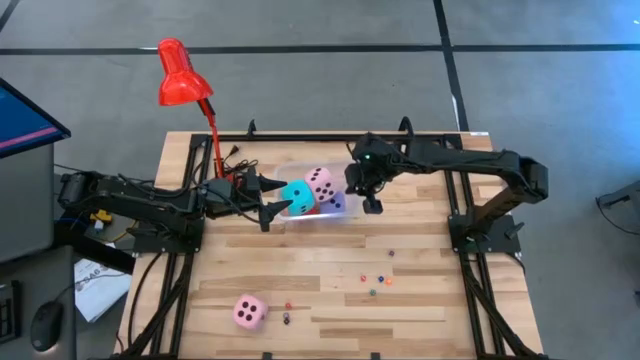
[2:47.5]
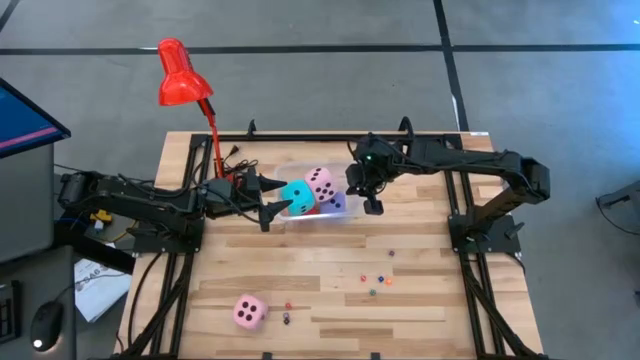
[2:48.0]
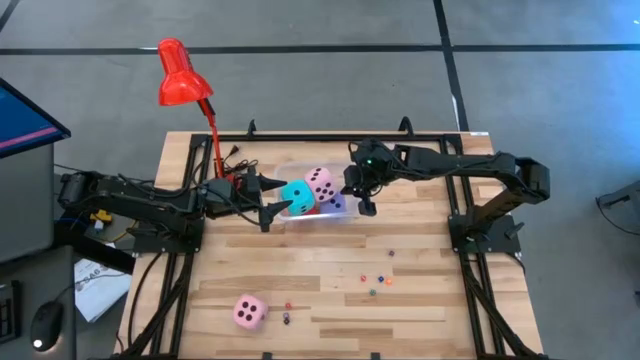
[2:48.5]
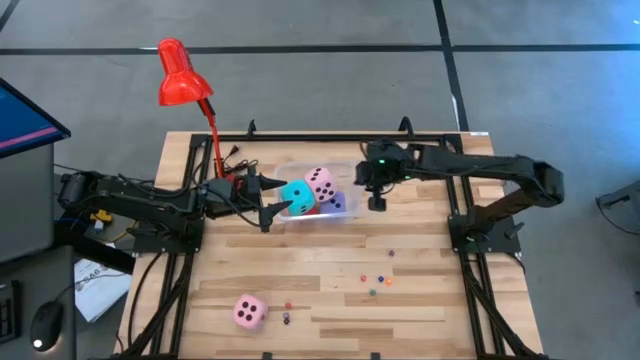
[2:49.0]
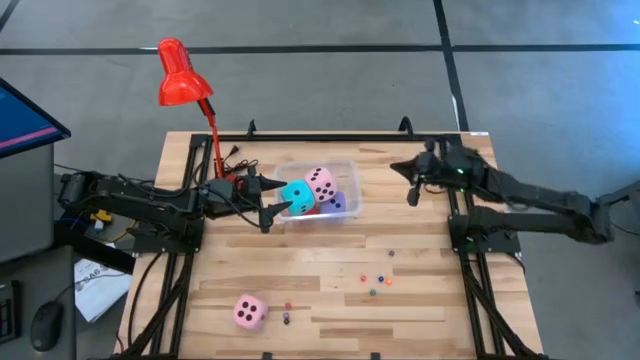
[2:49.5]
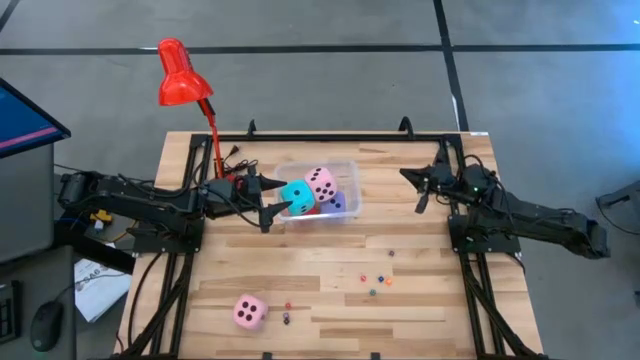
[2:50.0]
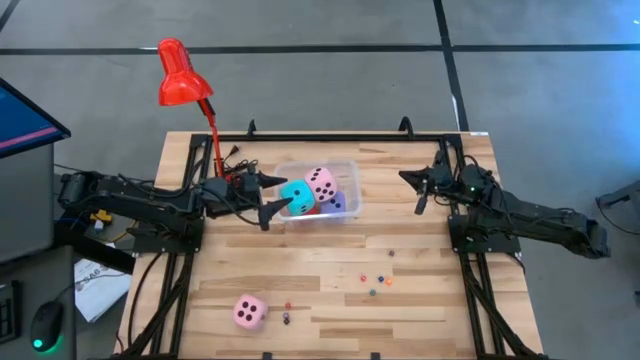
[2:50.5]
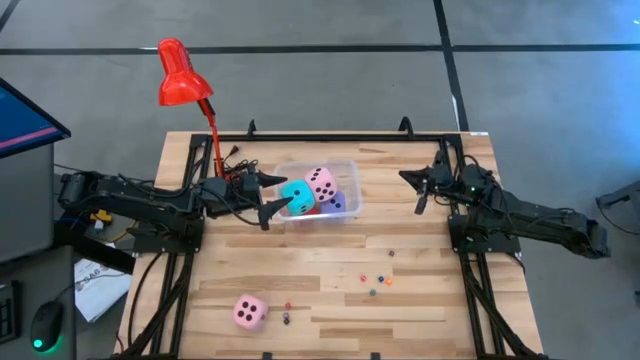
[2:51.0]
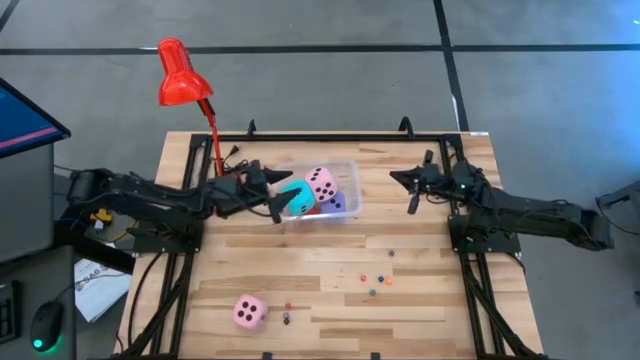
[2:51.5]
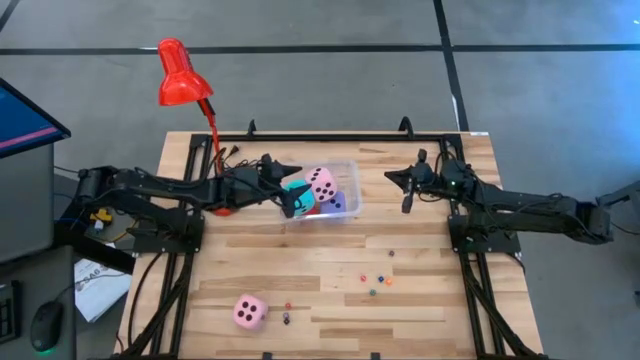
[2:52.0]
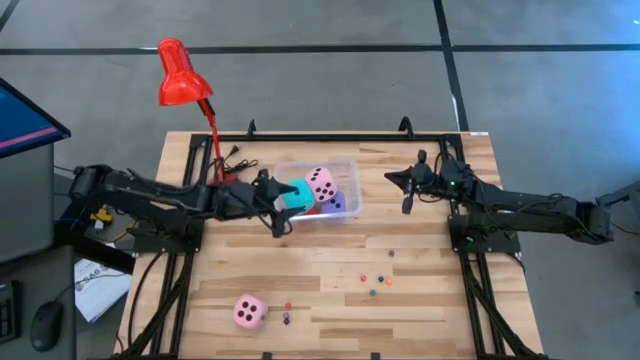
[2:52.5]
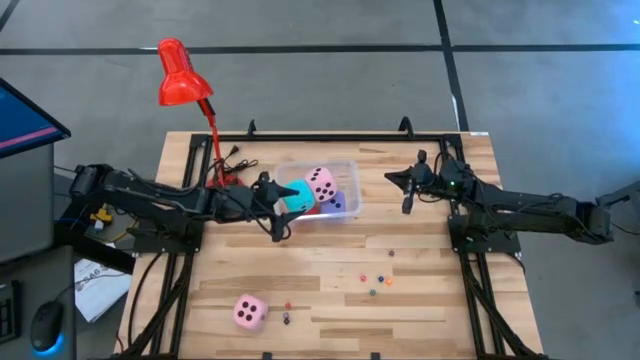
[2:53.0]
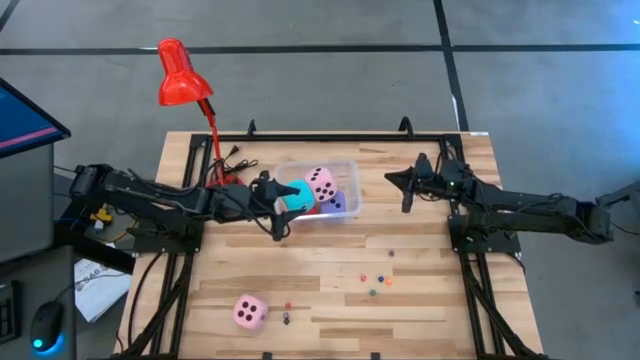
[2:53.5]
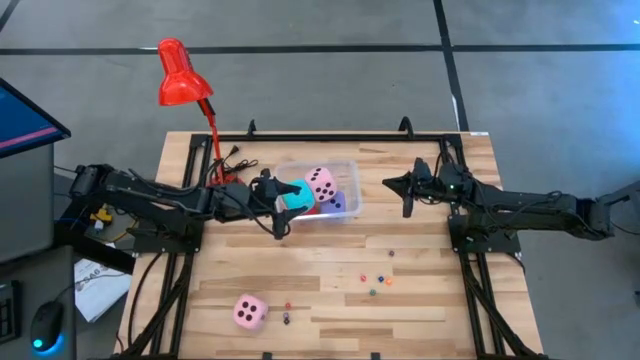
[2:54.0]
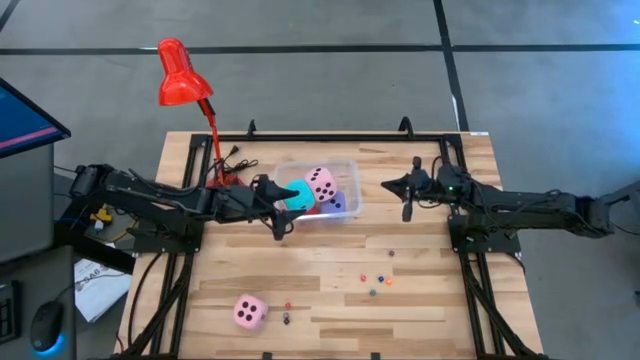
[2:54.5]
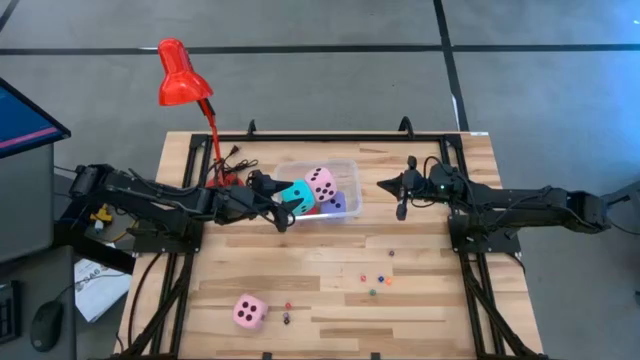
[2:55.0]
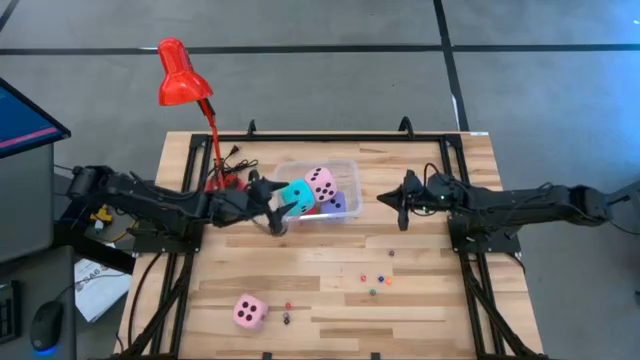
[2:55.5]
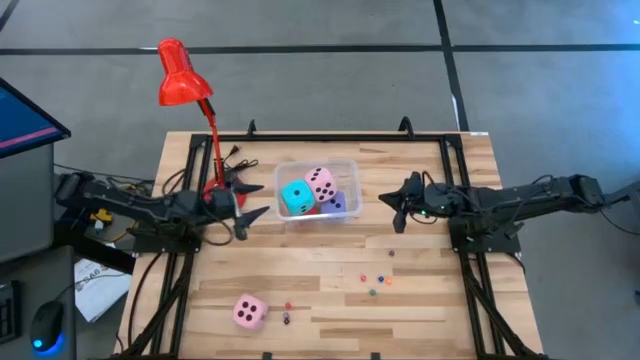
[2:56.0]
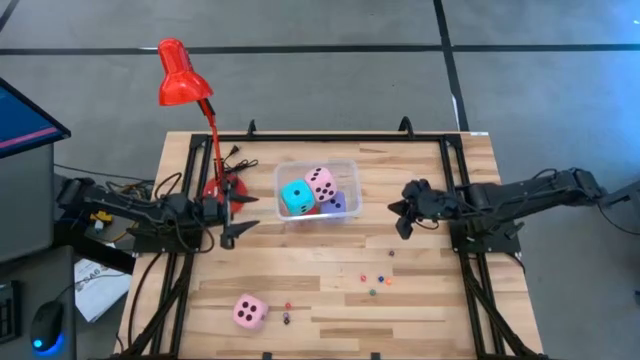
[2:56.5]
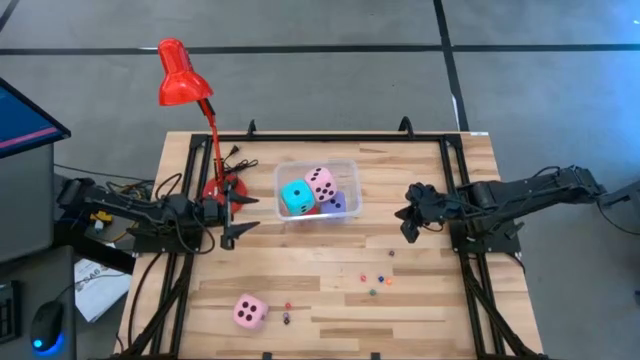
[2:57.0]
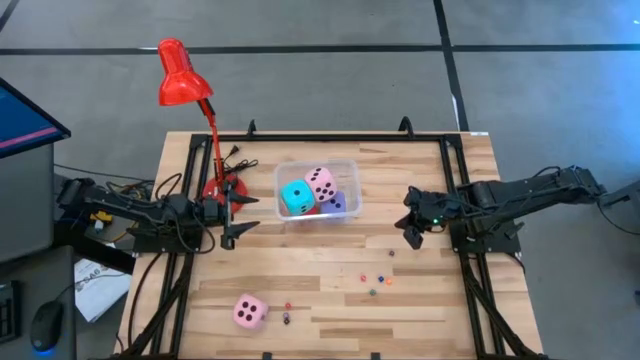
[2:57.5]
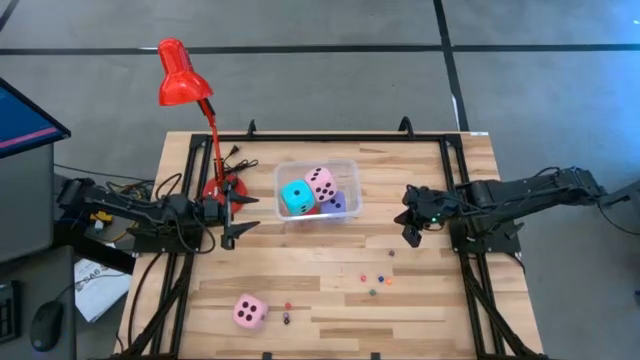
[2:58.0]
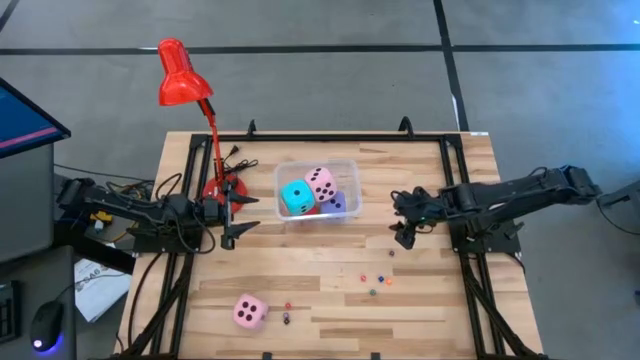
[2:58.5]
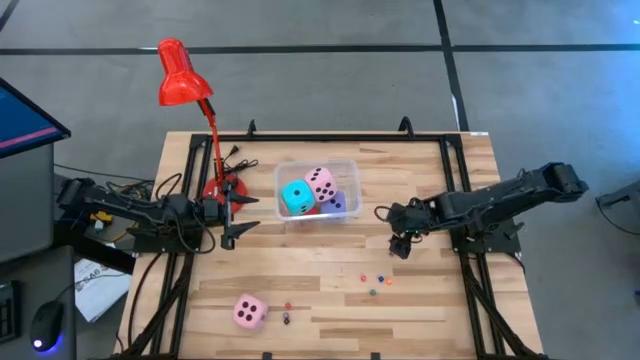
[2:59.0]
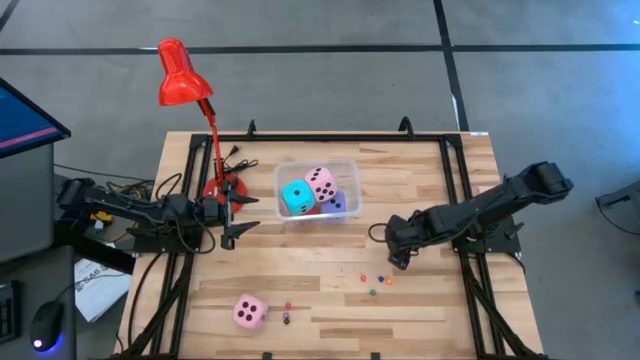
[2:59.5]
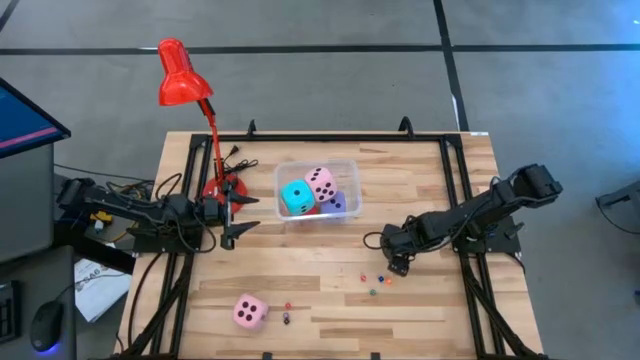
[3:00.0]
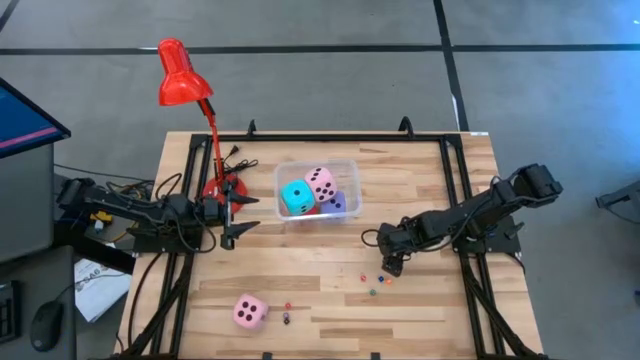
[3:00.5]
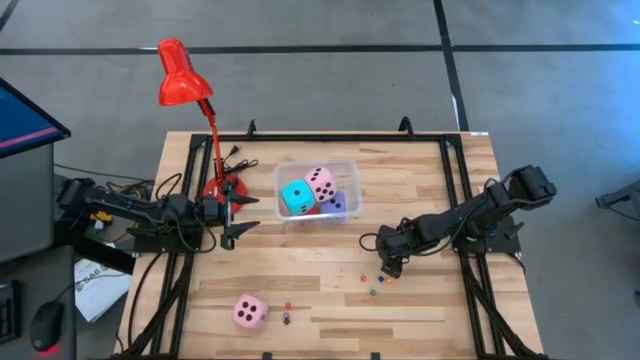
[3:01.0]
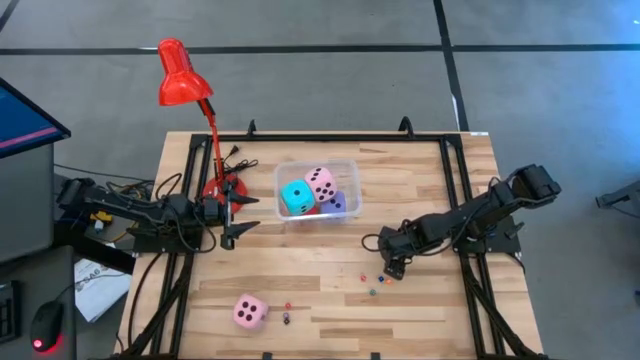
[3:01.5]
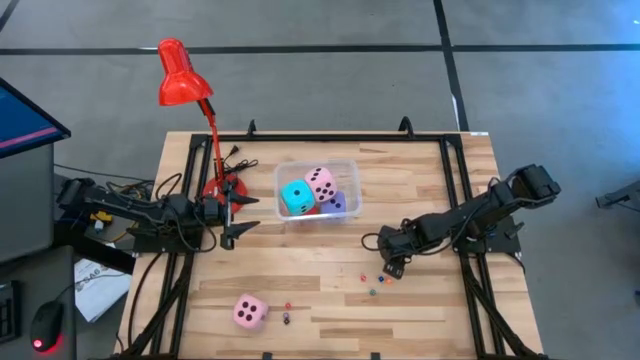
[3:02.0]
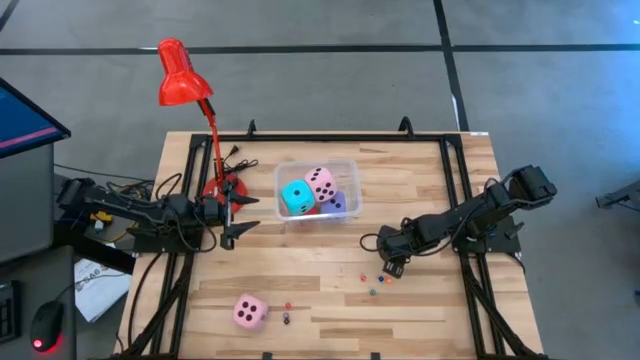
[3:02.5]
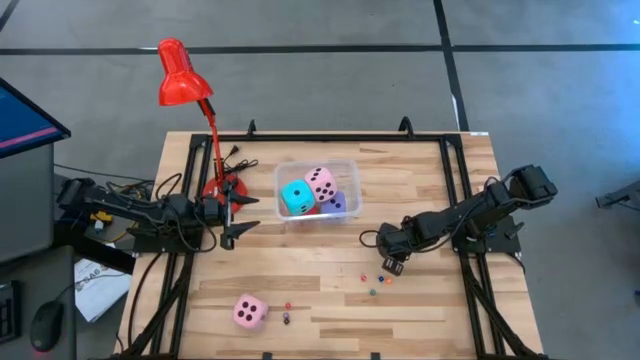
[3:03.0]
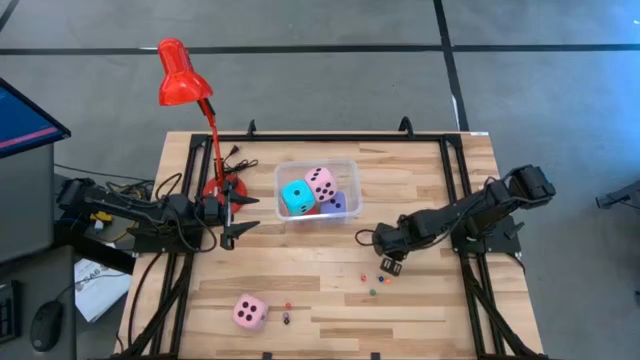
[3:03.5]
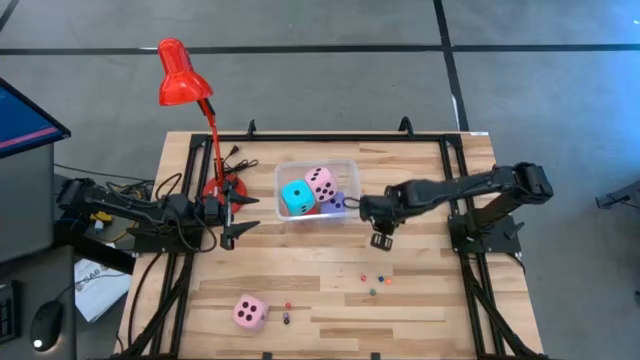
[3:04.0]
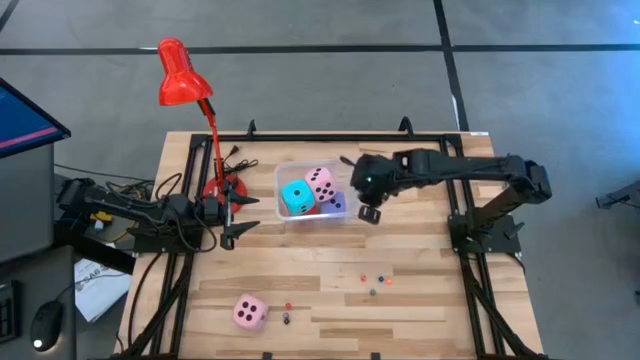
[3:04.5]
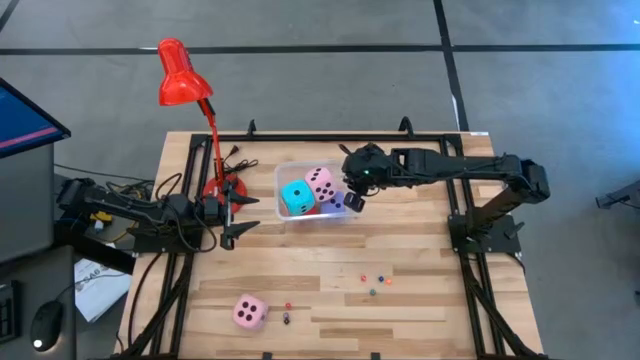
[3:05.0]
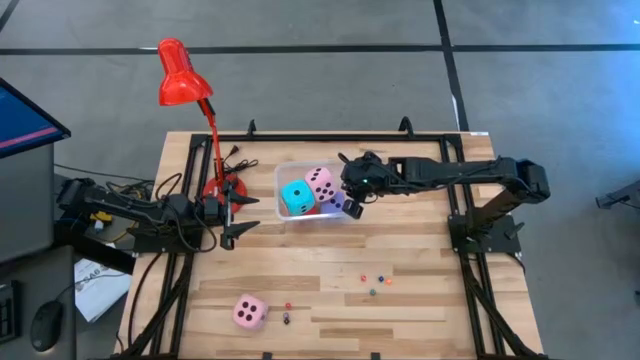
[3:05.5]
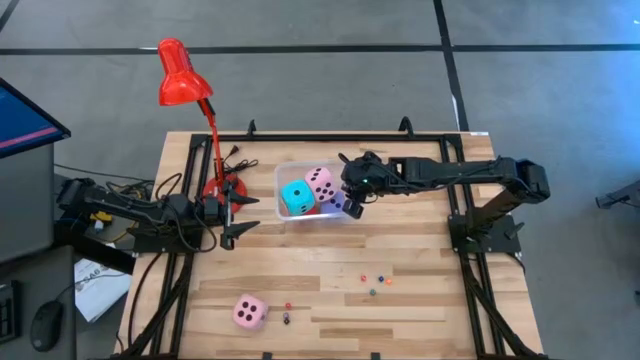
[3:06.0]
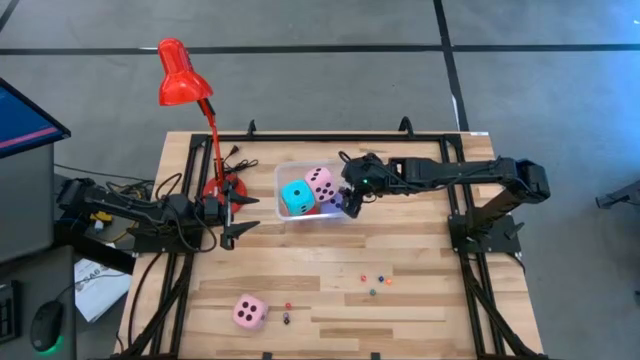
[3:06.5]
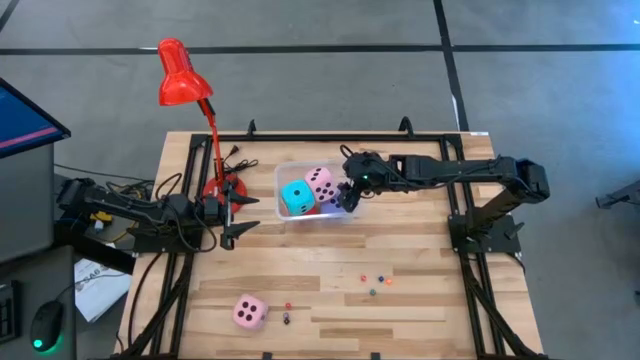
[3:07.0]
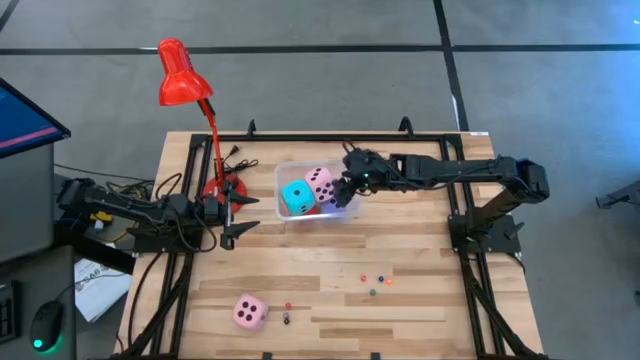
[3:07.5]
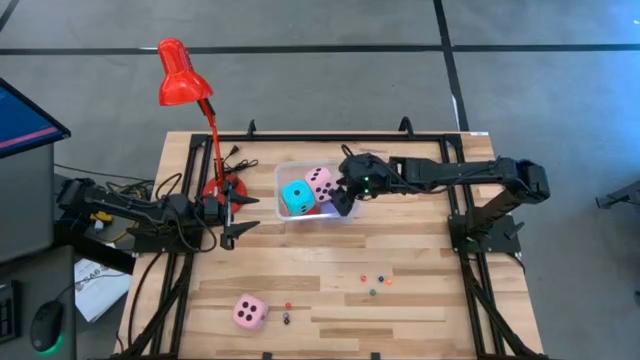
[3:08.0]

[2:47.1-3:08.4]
Task: Pick & Place Dice
Put the small purple die into the transparent bin
